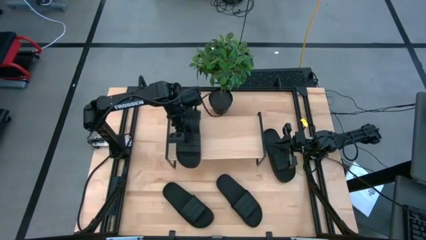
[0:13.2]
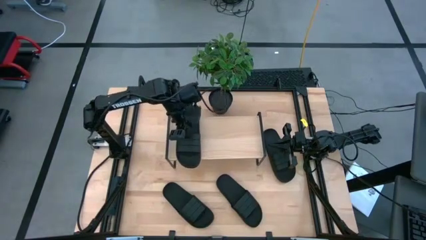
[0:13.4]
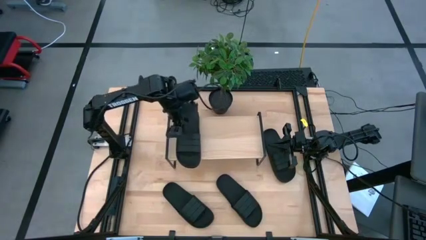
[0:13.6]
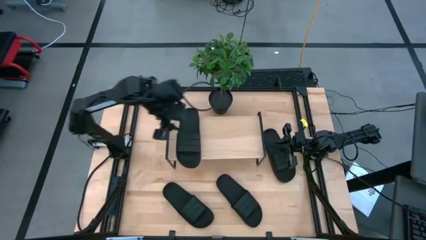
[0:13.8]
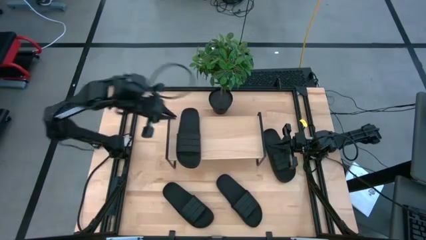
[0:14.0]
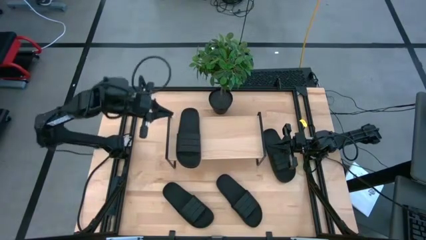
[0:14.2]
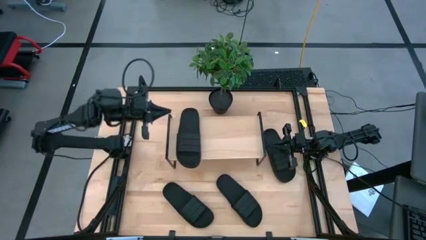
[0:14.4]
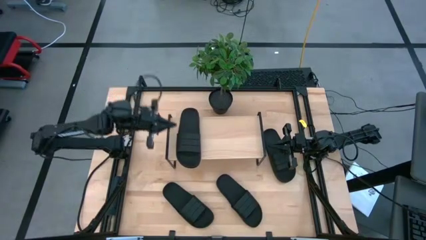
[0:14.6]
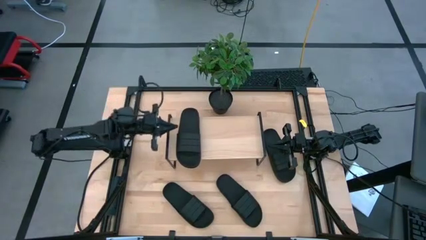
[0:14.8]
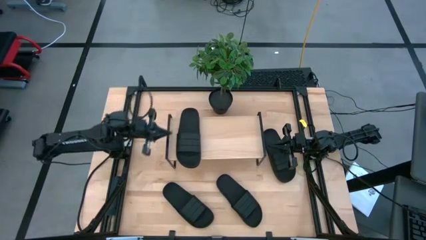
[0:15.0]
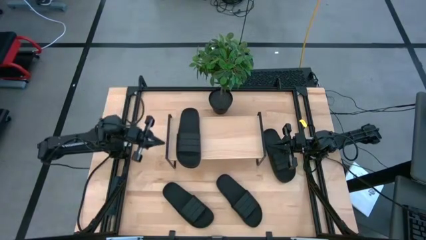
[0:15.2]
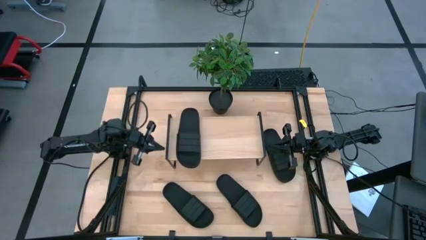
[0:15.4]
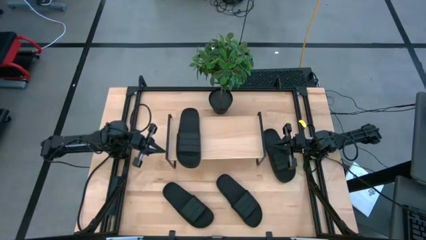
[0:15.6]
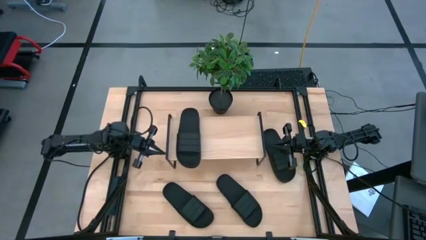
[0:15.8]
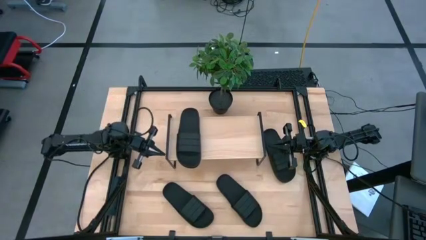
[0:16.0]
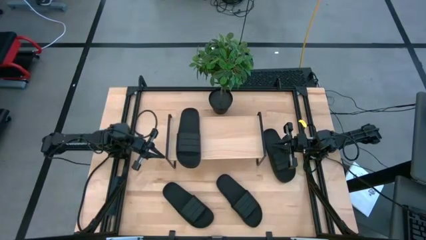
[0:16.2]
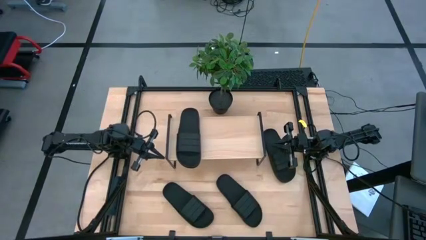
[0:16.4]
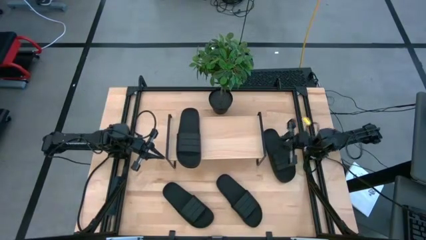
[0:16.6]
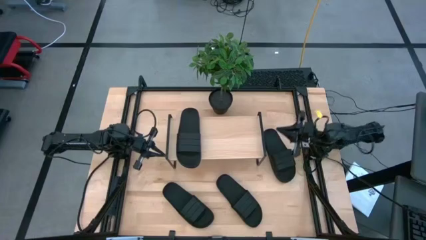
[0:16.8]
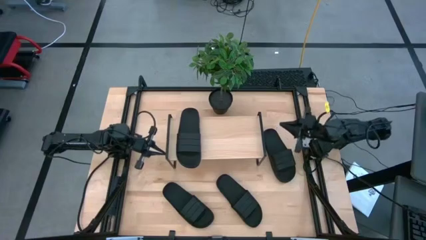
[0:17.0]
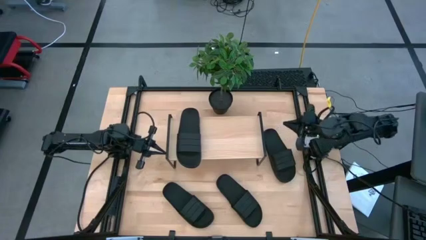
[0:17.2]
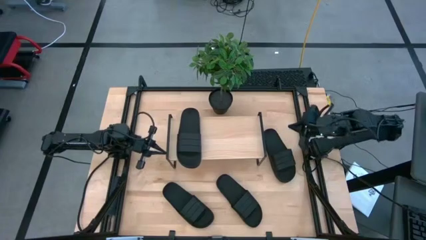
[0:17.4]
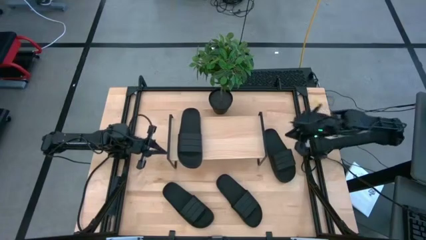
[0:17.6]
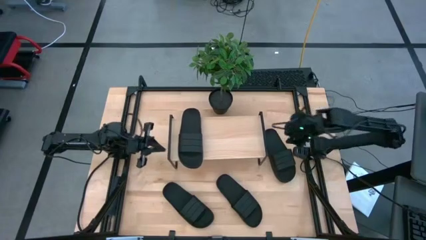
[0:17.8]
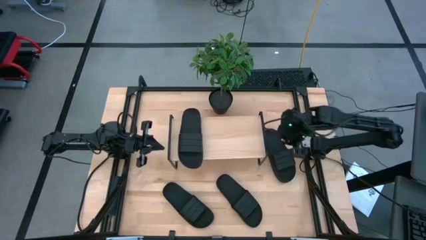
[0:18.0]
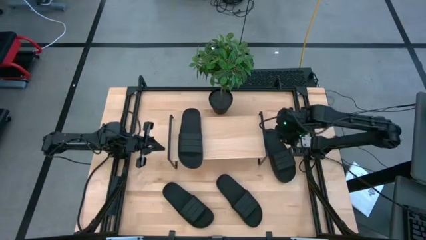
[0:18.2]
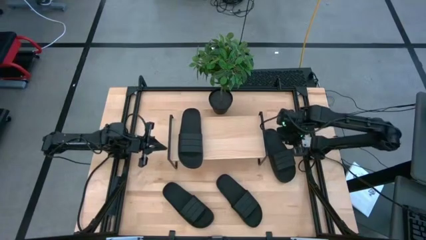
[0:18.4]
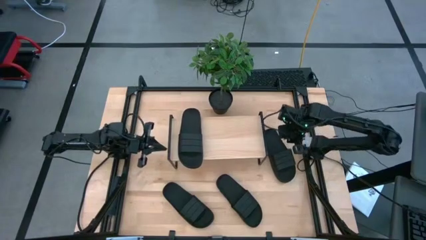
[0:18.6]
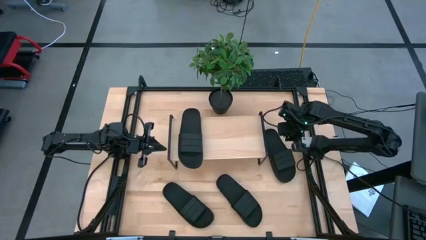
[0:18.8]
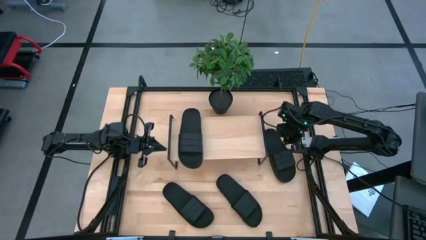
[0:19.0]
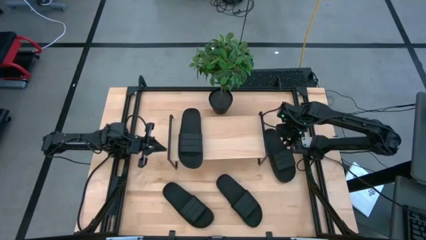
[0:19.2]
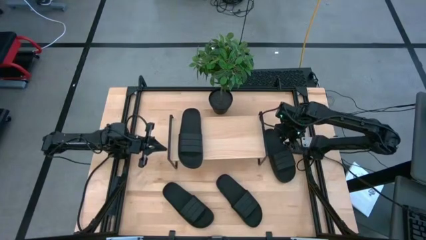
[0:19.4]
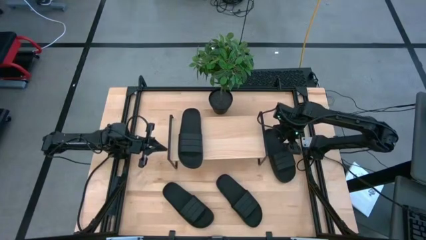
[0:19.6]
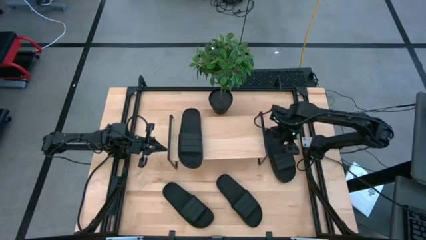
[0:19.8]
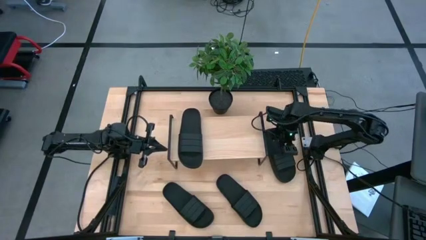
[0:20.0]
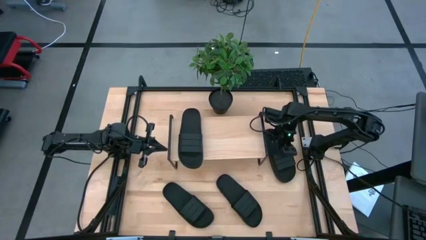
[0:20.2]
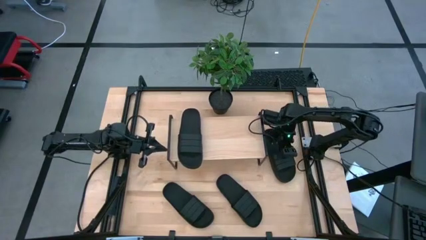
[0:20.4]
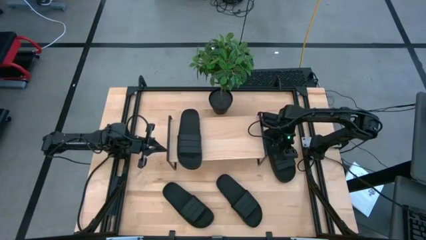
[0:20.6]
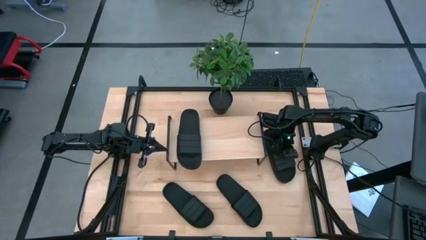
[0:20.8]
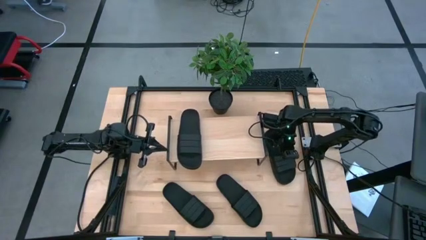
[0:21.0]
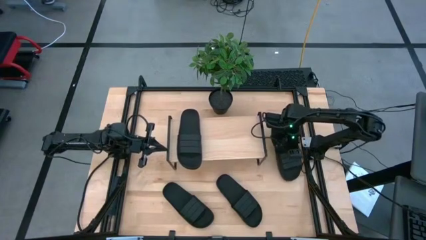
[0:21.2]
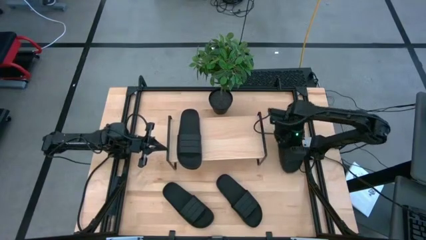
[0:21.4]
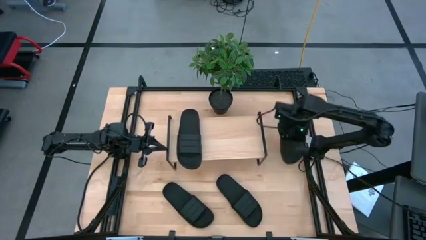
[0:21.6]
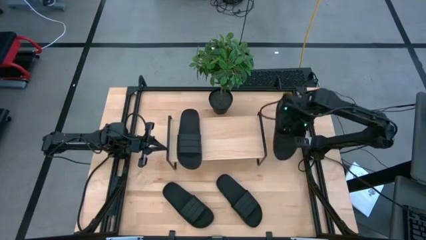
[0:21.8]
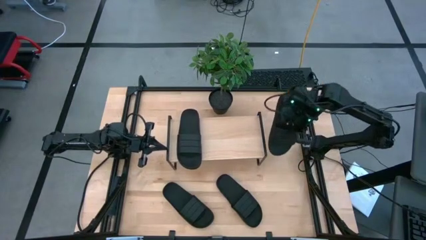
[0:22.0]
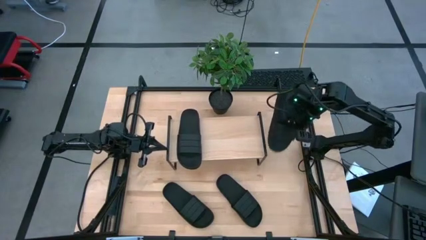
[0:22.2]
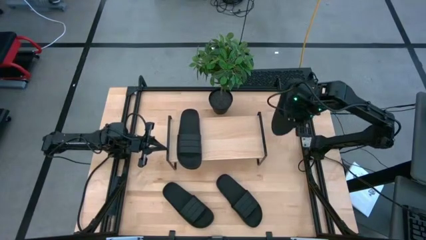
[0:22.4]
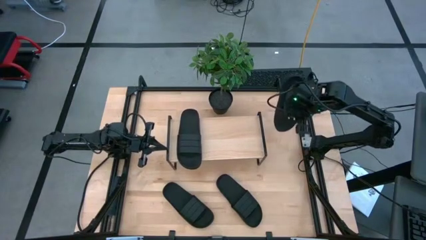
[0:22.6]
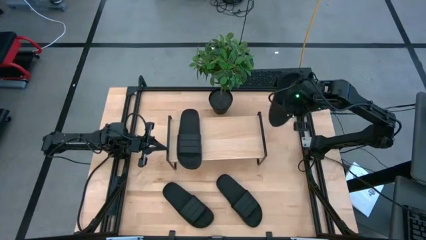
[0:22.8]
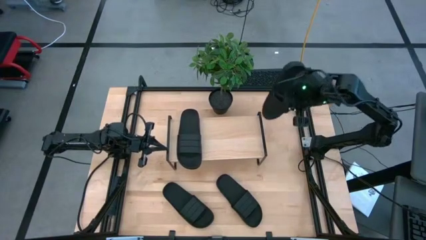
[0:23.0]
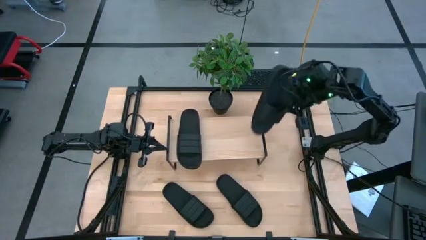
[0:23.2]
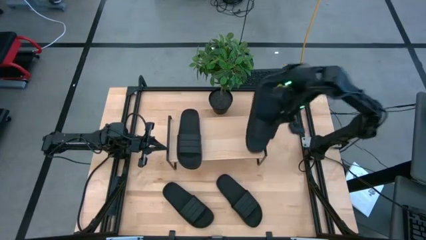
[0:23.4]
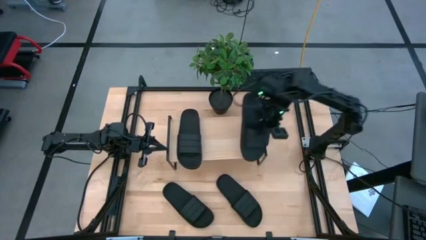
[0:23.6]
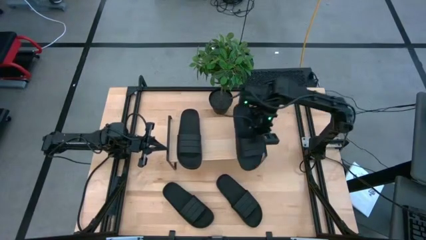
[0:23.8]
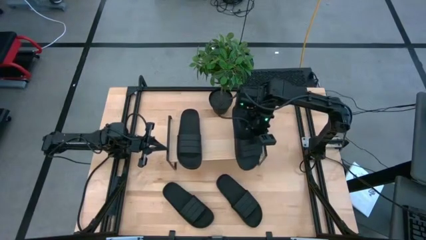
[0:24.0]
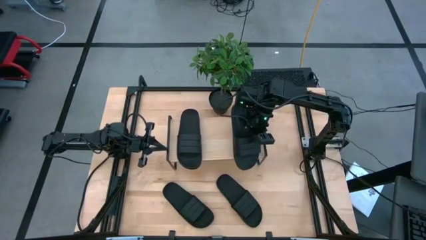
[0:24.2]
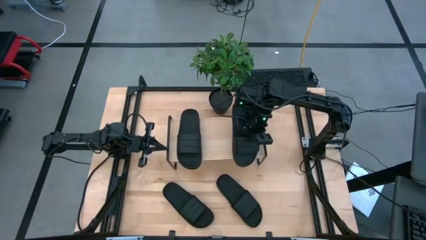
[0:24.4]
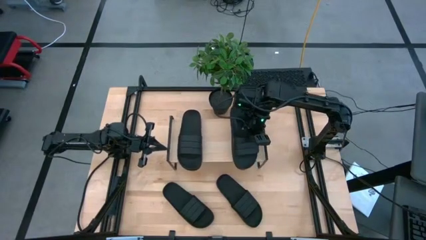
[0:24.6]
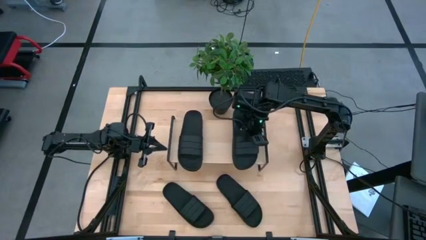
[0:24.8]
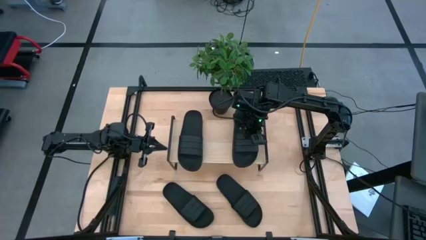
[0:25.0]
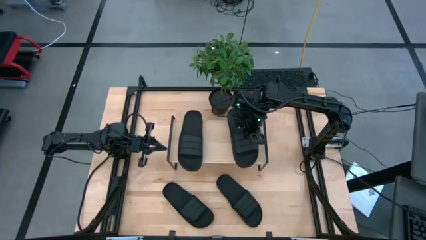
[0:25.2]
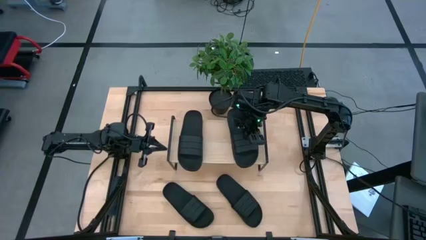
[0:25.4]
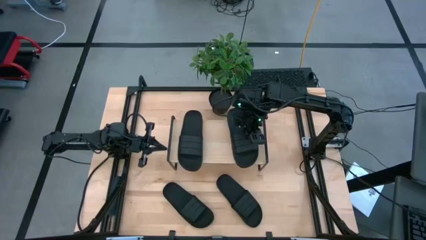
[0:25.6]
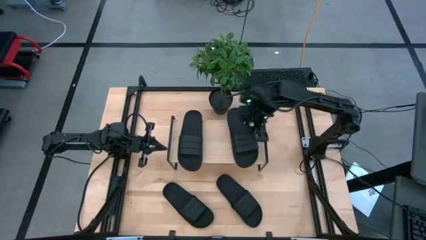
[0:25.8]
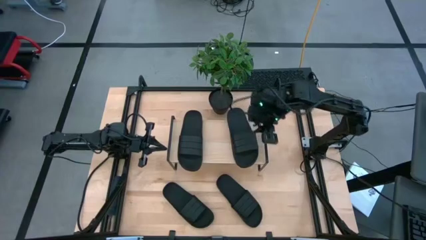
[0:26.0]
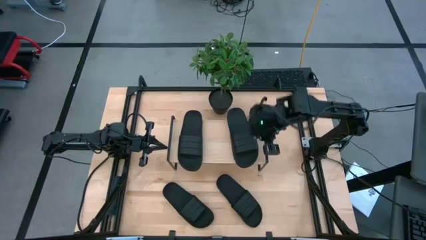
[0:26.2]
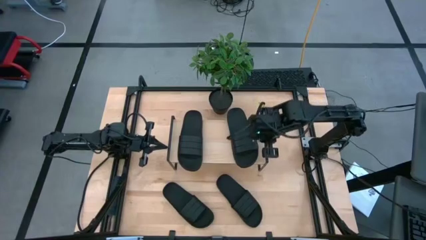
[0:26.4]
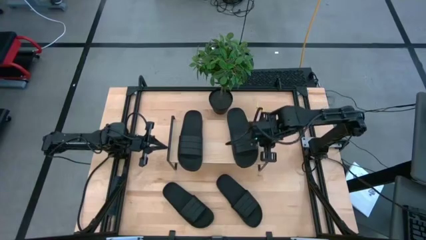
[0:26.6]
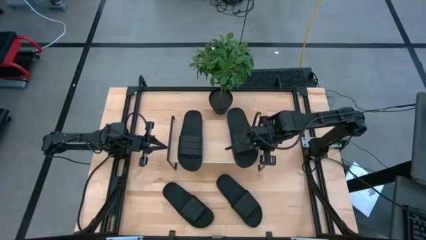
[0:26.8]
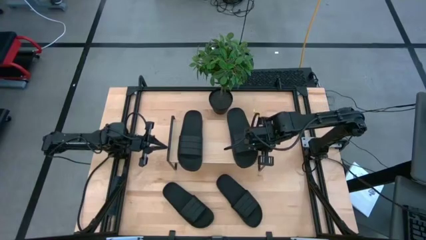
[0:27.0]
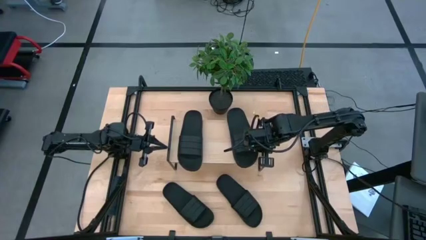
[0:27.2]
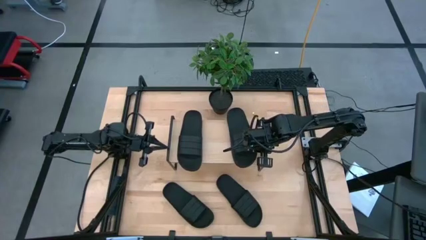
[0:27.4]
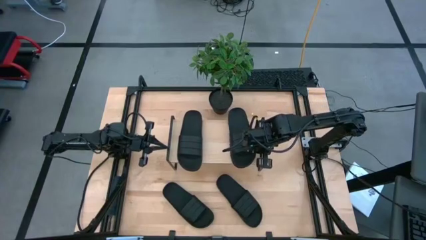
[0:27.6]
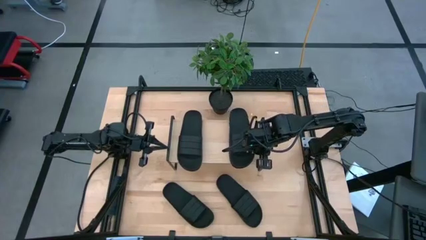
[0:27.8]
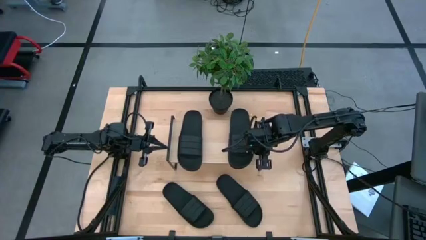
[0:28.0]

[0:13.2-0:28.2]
Task: Pick and place slides into the shelf
Put the right black slide on the shelf
